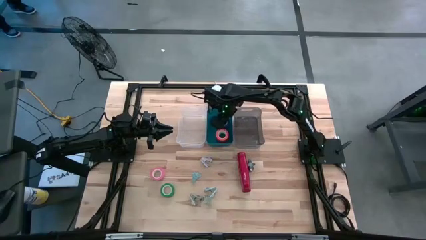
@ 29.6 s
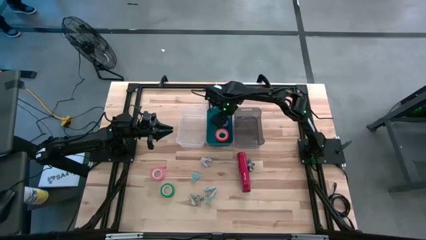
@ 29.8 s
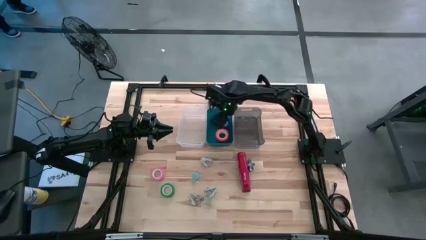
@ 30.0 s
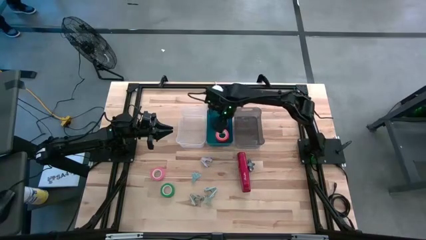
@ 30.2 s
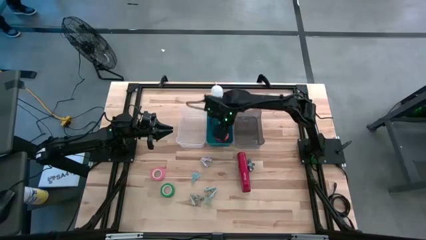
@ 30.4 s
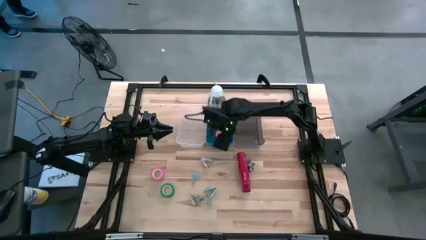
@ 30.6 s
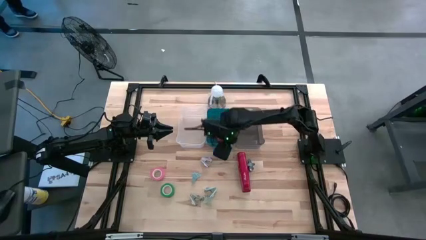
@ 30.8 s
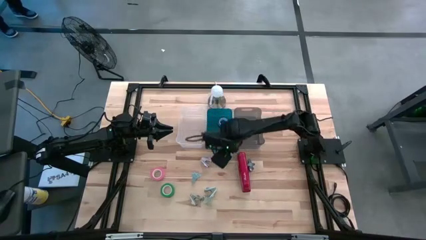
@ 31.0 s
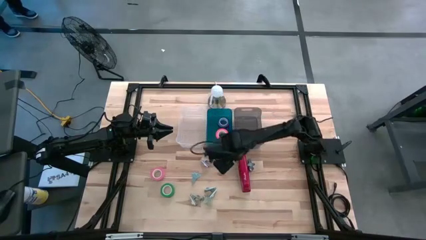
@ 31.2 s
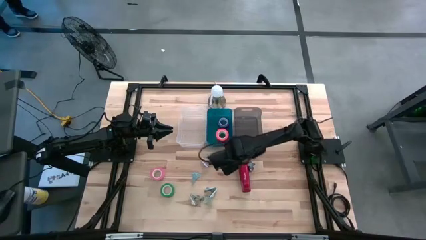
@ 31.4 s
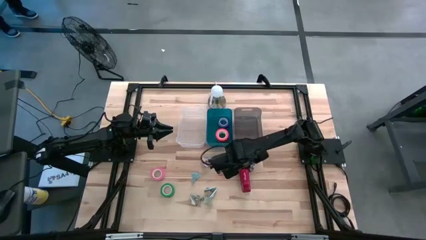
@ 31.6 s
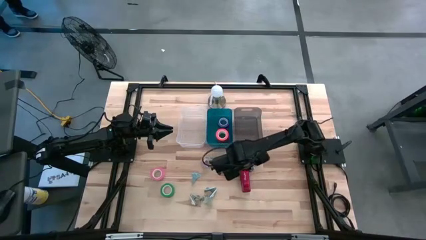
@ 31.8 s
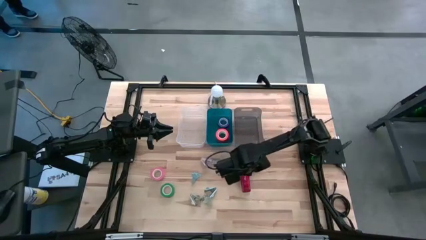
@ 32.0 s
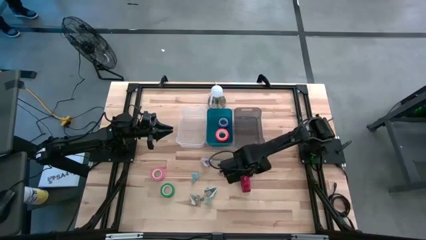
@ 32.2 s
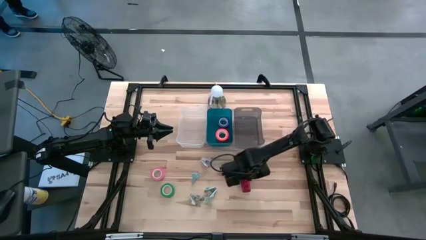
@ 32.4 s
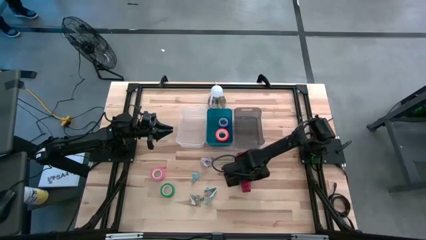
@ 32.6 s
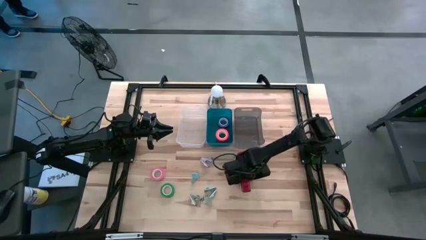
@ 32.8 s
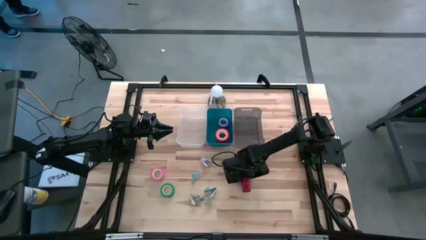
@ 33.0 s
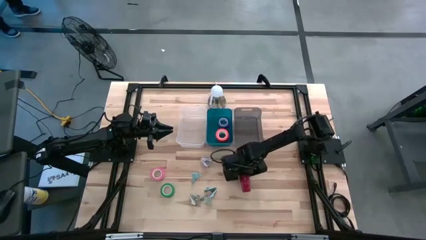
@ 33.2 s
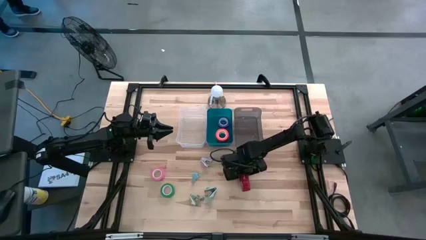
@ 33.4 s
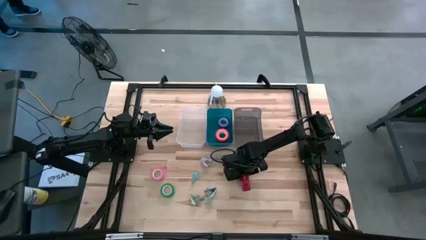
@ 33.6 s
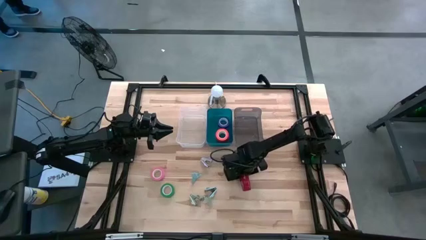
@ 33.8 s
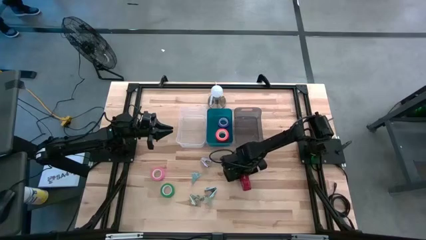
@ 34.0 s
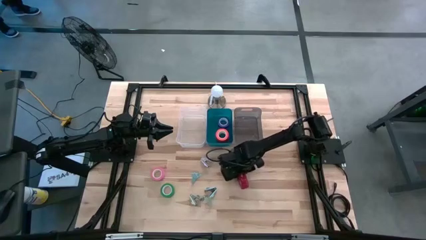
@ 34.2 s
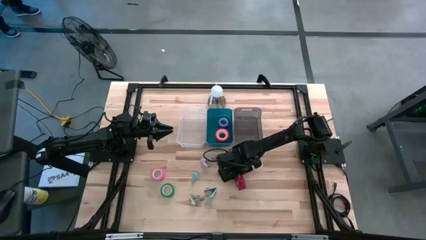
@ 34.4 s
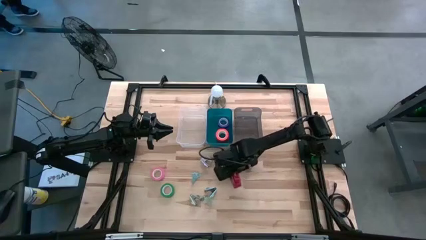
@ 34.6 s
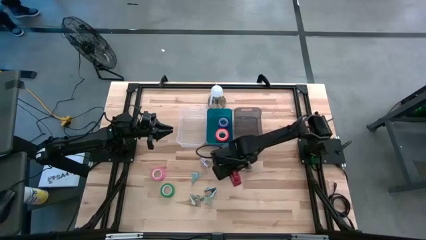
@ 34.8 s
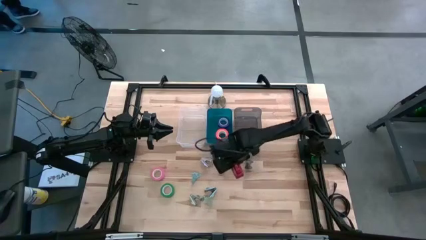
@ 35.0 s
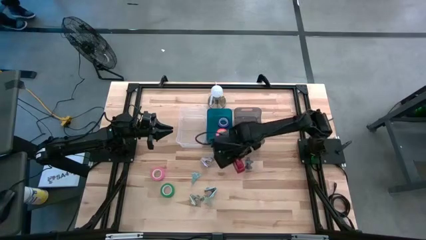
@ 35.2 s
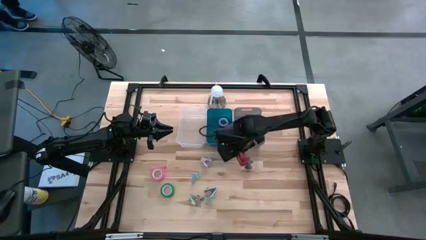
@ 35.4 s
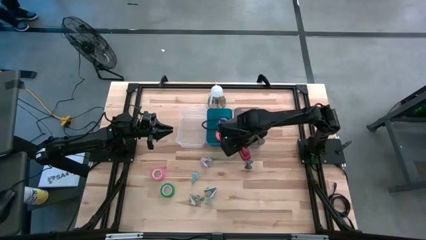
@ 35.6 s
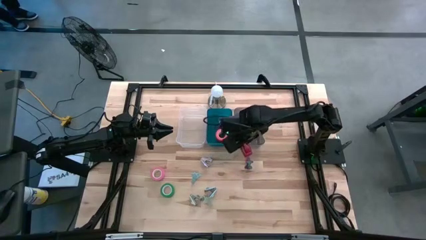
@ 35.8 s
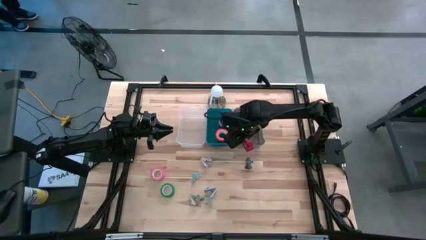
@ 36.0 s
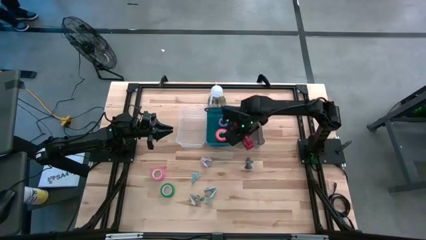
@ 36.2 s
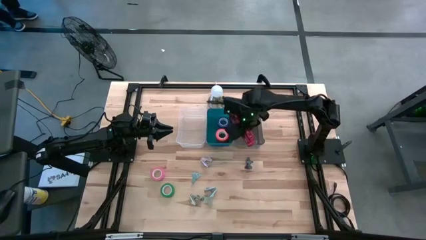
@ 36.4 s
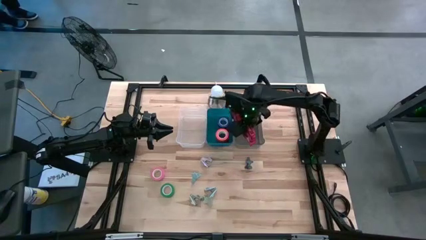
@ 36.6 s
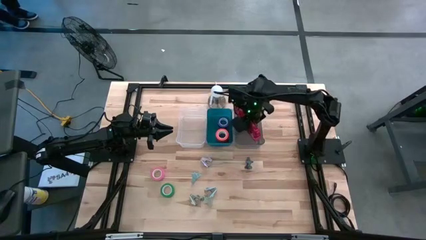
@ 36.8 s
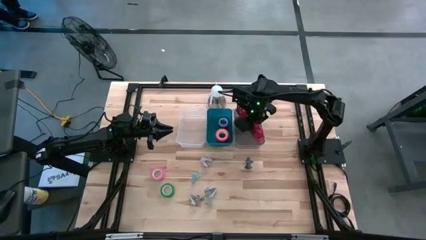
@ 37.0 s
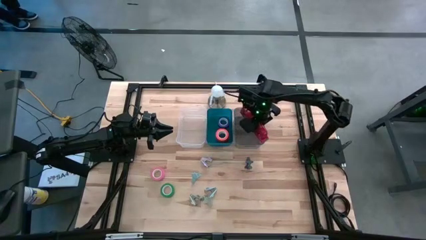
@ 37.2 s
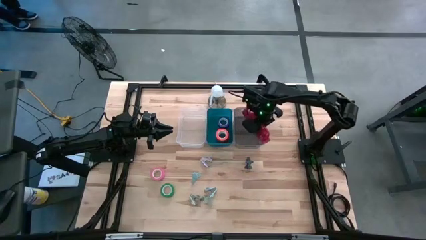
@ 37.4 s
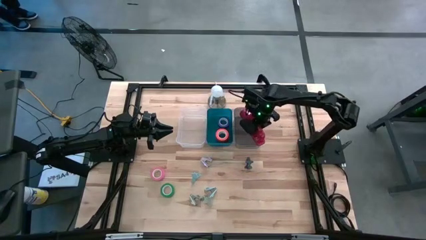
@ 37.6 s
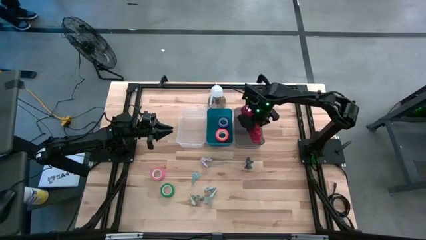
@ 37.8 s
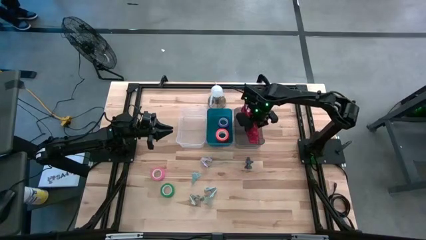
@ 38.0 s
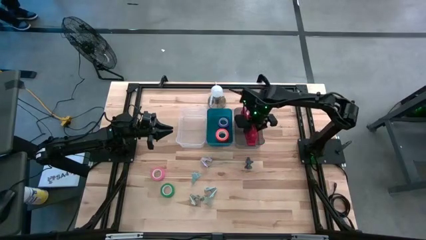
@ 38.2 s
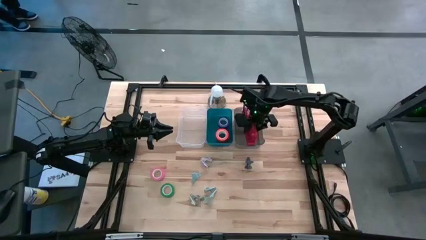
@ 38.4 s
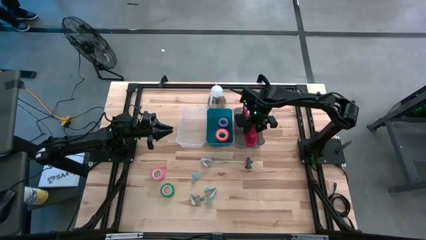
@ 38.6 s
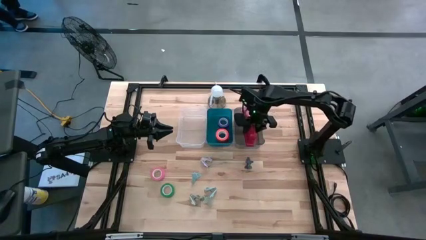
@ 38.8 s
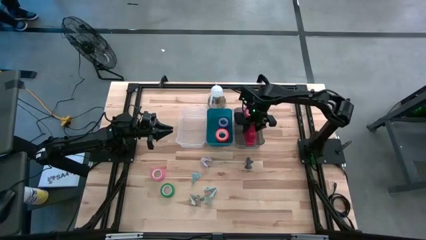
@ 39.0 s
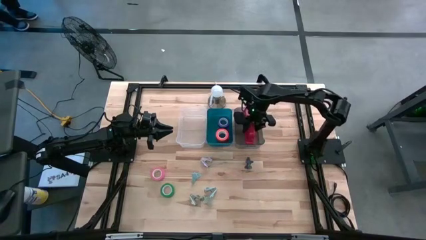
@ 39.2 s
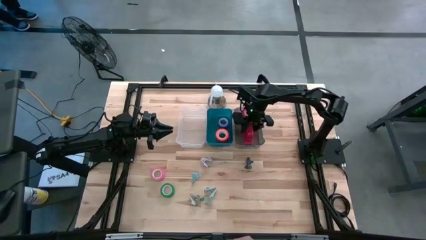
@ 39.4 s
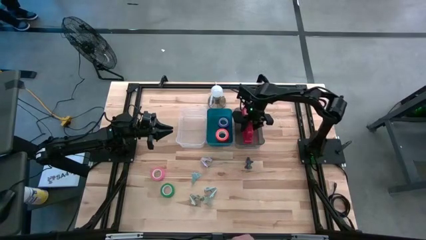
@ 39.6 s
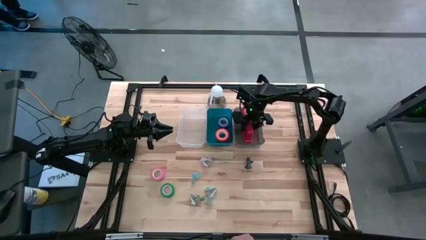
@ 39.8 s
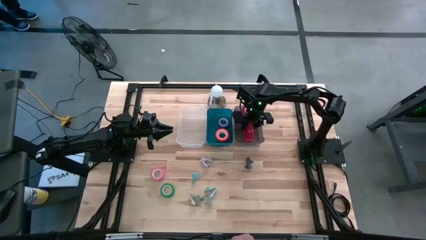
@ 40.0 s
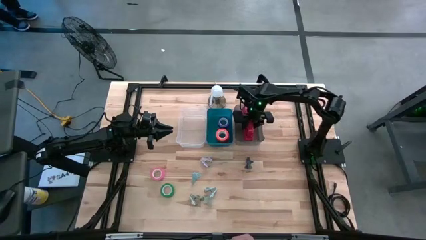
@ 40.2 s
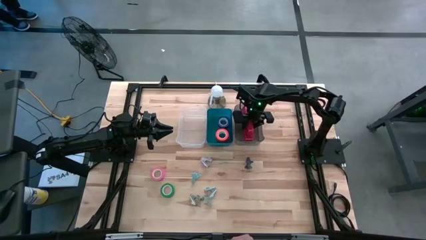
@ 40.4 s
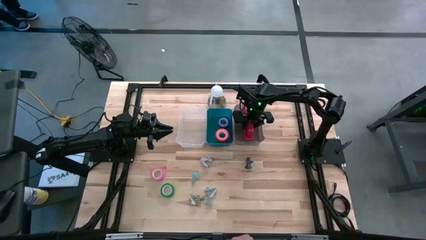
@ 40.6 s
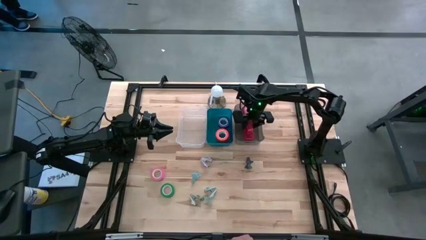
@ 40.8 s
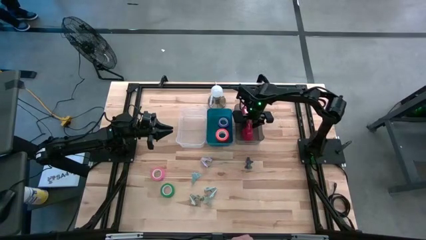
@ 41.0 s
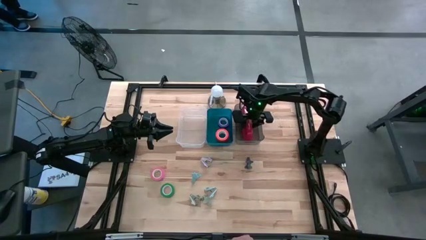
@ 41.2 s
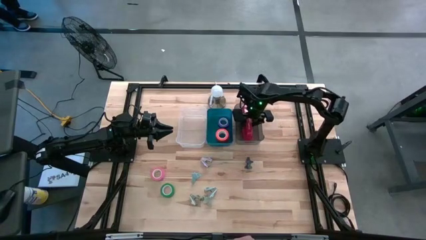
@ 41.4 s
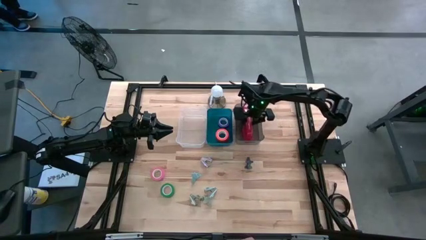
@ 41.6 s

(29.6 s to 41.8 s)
Task: Pick and place Stapler, Stapler remover, tape
Put the red stapler into the black bin

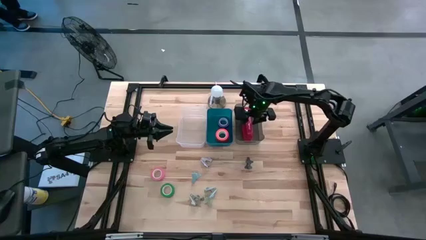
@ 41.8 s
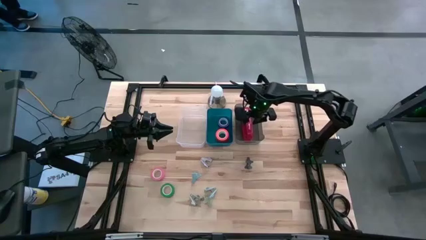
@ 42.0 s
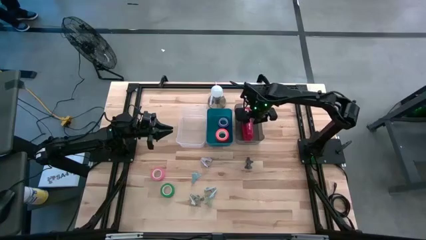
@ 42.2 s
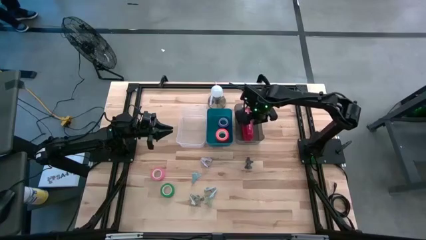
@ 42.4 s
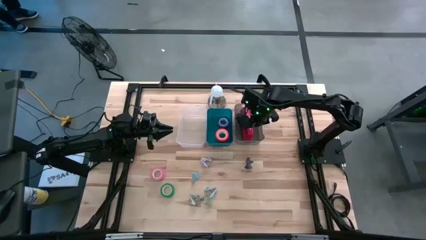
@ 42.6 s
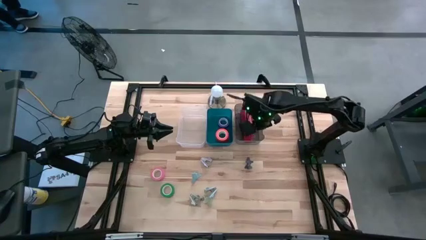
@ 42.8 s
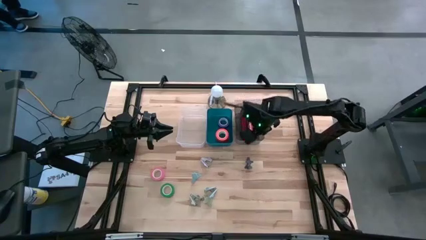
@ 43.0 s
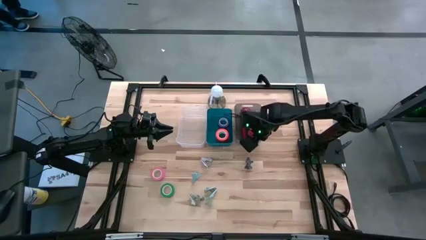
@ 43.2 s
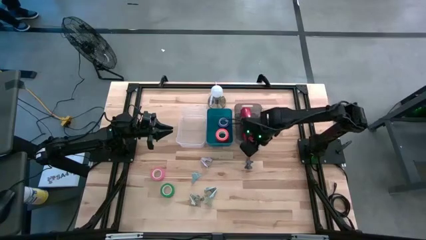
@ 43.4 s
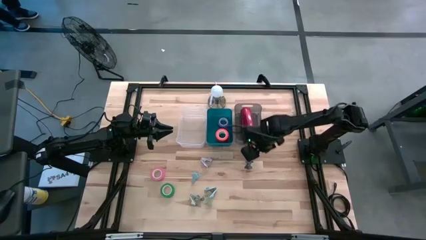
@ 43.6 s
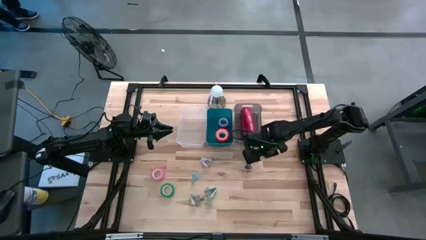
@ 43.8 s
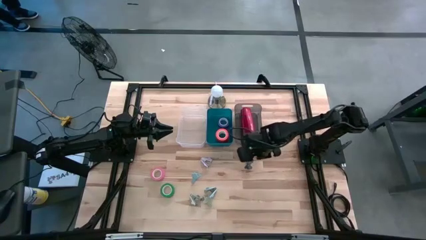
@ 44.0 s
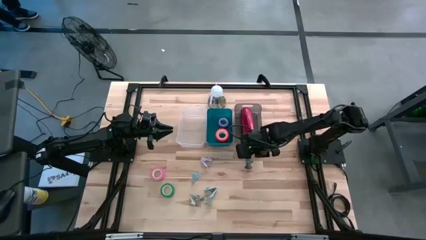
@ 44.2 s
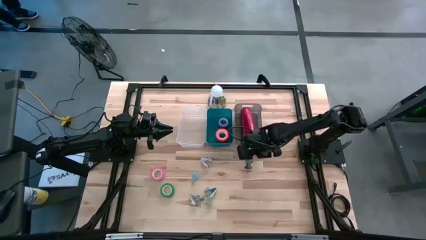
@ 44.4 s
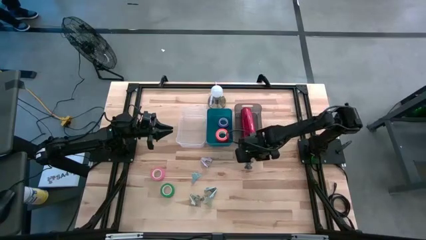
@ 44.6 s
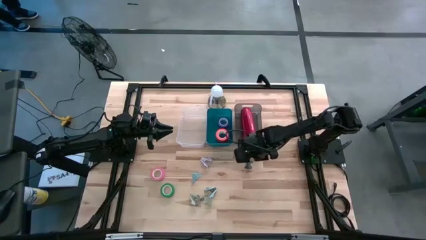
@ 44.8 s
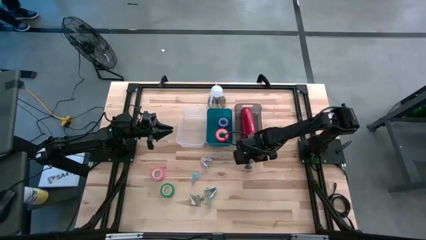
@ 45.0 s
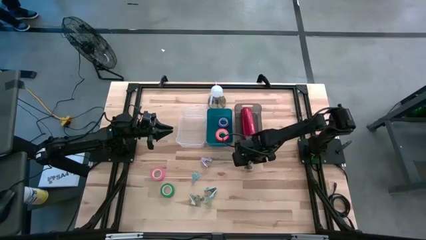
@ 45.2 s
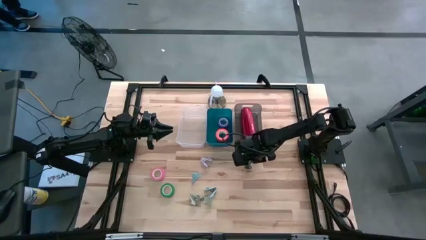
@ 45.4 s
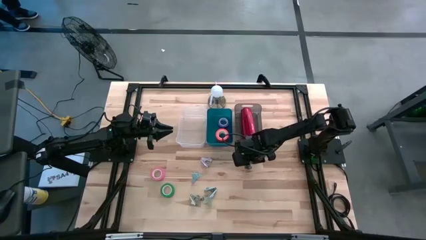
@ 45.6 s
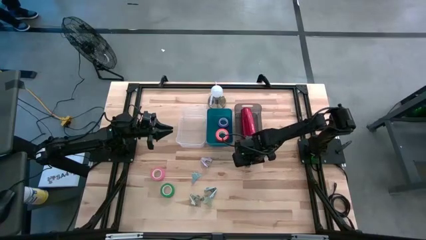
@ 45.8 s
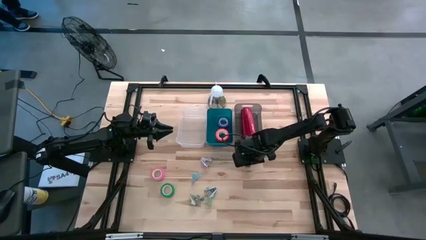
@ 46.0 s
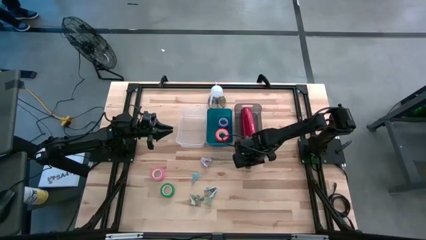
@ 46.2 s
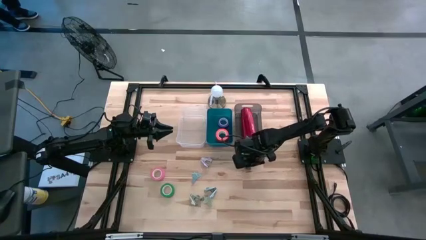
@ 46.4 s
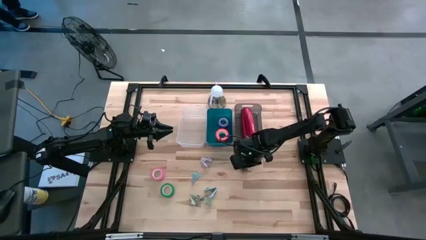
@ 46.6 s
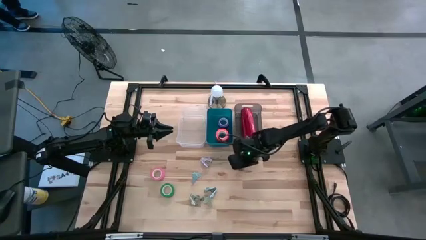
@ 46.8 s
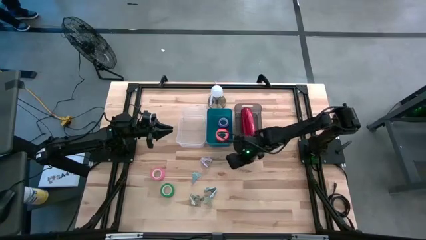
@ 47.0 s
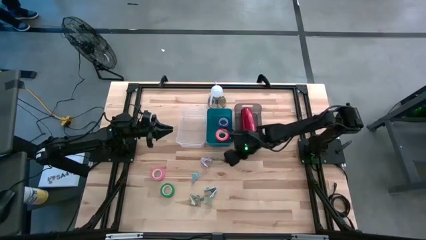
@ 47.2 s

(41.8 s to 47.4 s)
Put the black staple remover into the transparent bin
